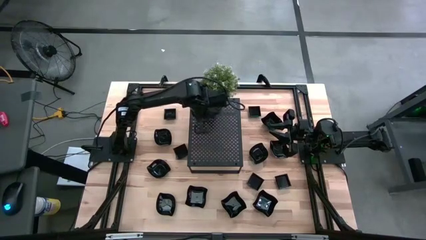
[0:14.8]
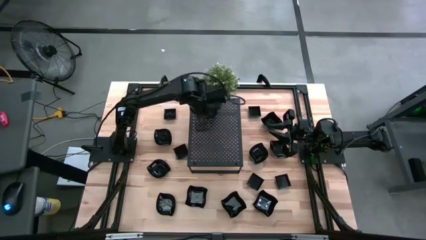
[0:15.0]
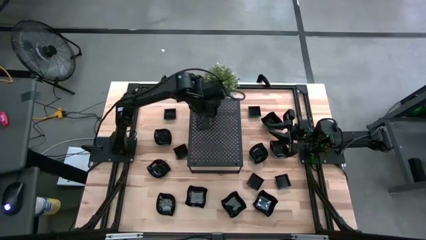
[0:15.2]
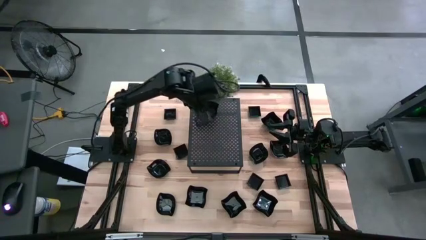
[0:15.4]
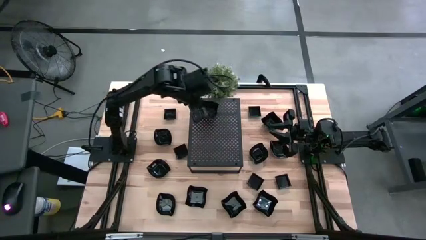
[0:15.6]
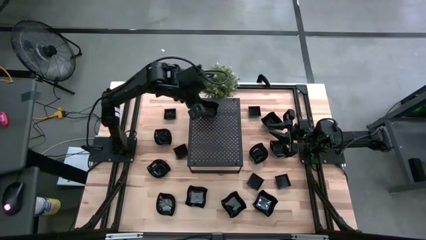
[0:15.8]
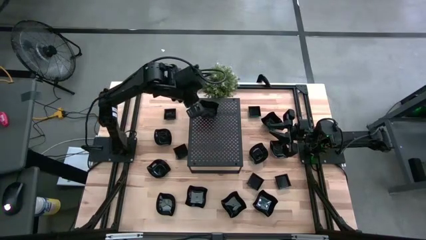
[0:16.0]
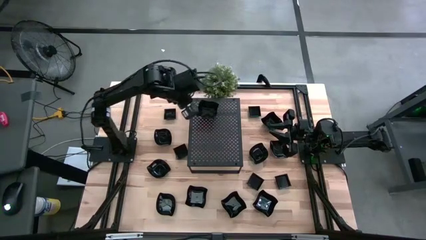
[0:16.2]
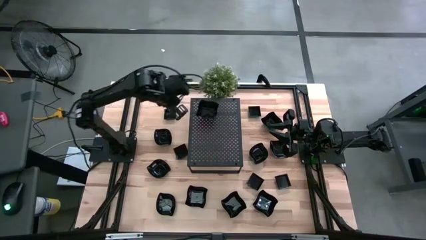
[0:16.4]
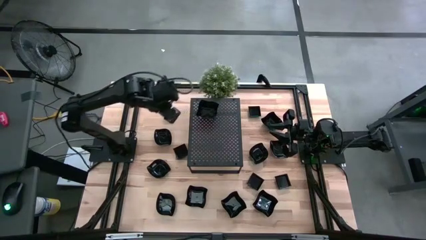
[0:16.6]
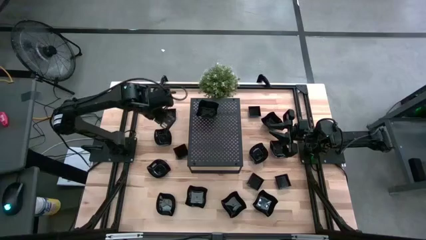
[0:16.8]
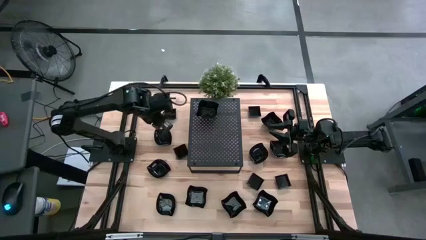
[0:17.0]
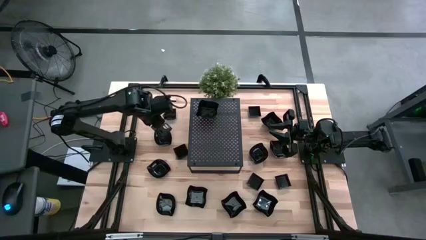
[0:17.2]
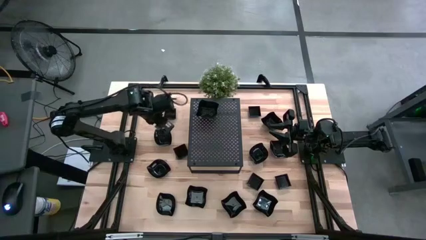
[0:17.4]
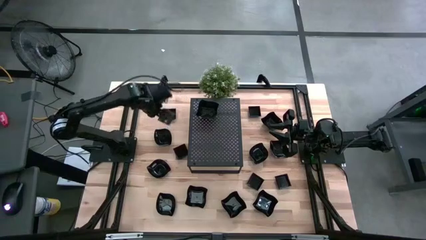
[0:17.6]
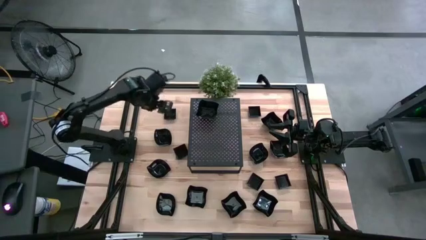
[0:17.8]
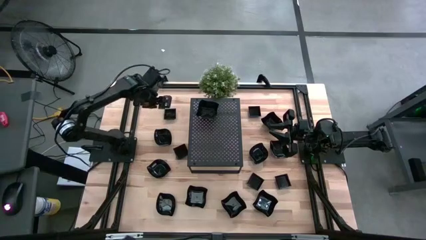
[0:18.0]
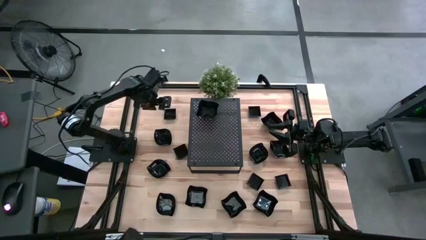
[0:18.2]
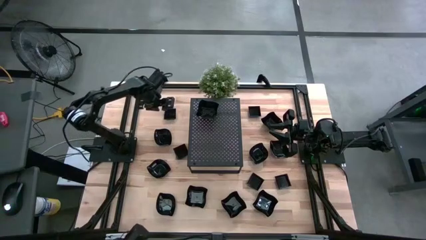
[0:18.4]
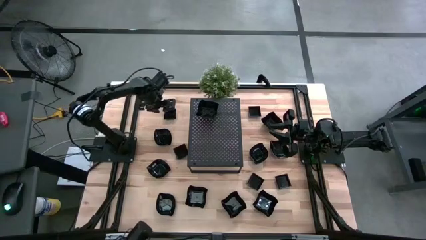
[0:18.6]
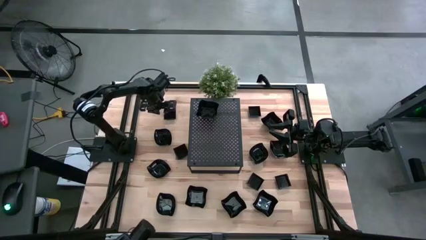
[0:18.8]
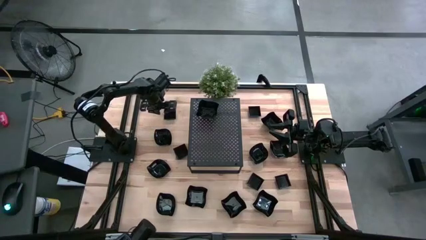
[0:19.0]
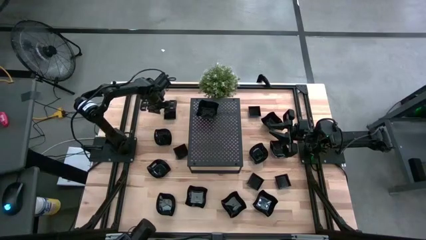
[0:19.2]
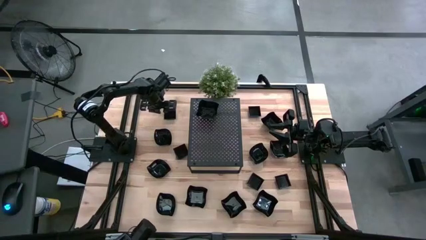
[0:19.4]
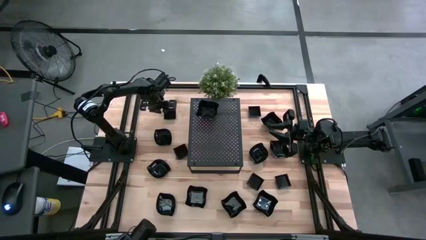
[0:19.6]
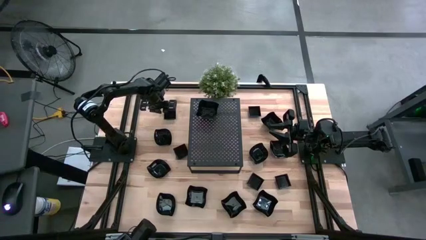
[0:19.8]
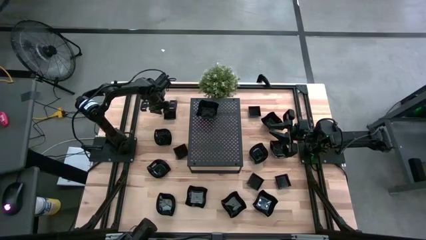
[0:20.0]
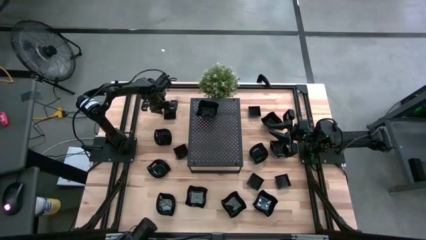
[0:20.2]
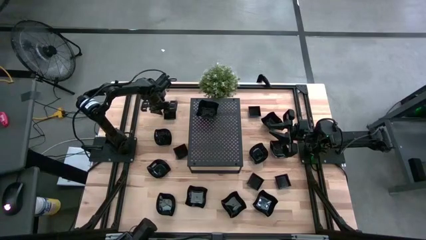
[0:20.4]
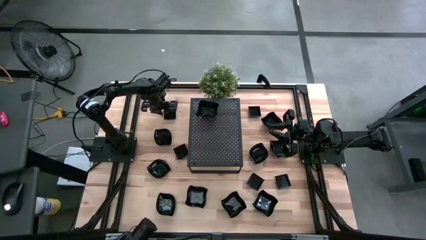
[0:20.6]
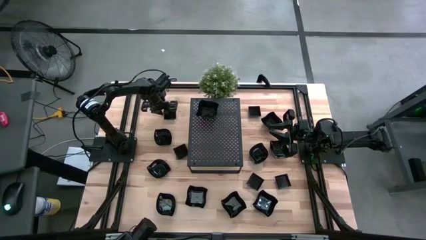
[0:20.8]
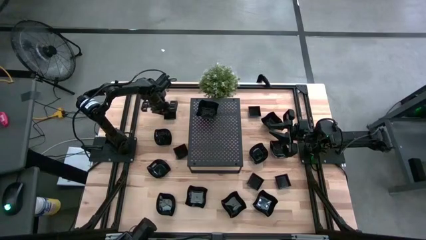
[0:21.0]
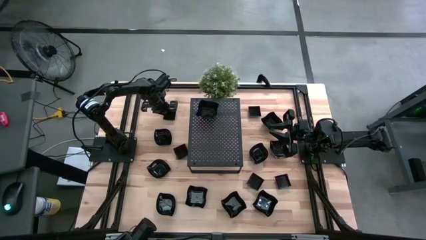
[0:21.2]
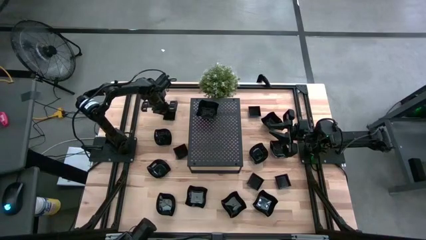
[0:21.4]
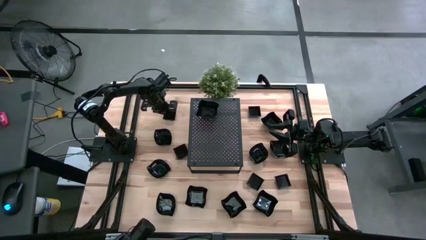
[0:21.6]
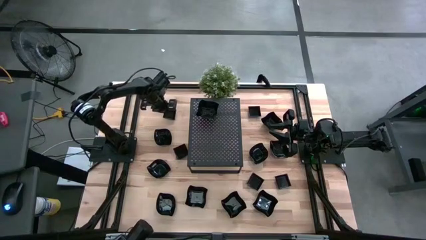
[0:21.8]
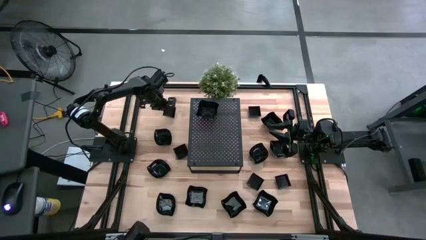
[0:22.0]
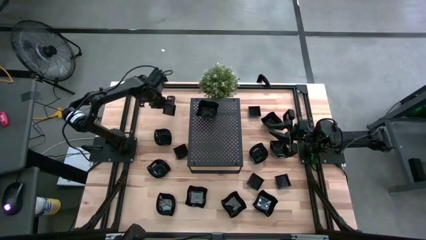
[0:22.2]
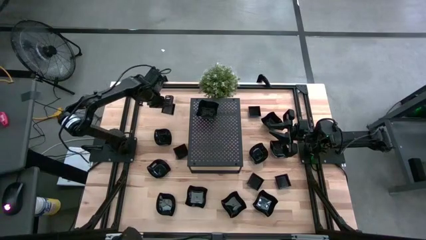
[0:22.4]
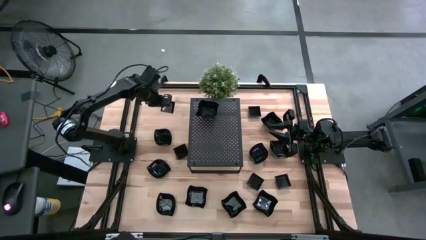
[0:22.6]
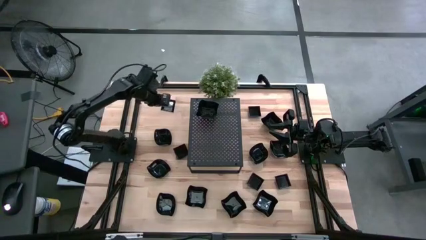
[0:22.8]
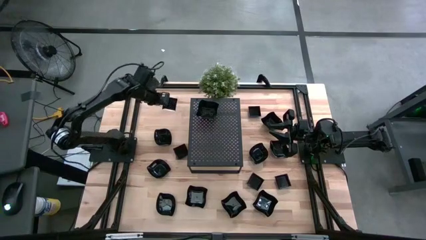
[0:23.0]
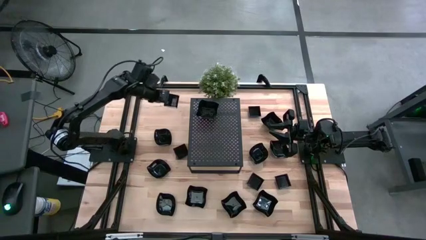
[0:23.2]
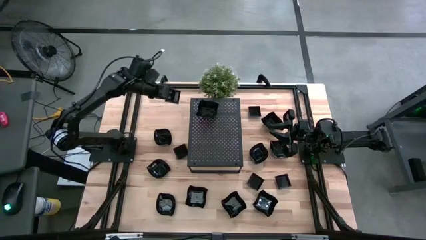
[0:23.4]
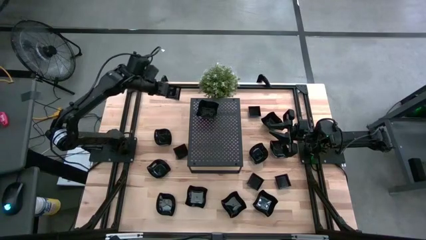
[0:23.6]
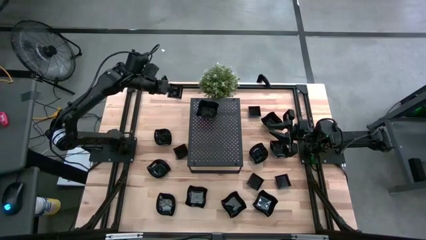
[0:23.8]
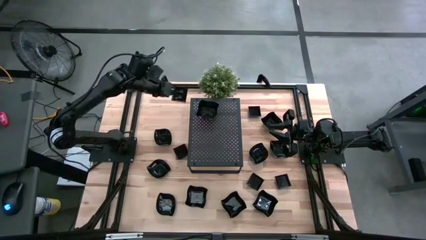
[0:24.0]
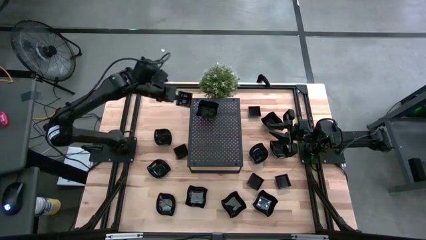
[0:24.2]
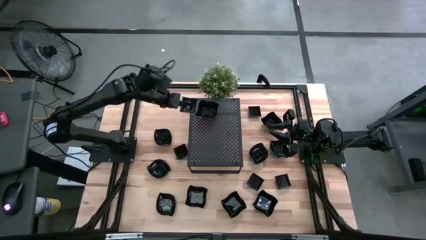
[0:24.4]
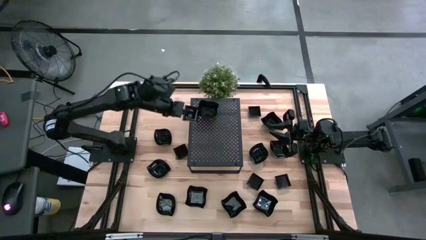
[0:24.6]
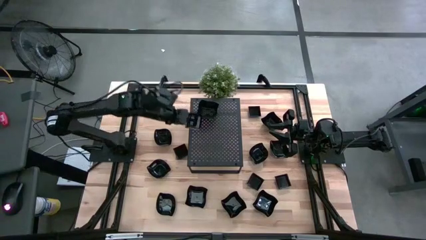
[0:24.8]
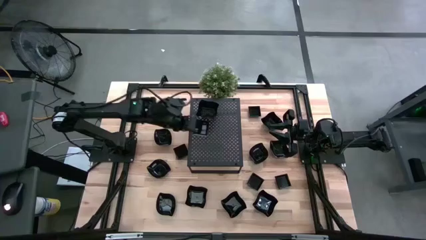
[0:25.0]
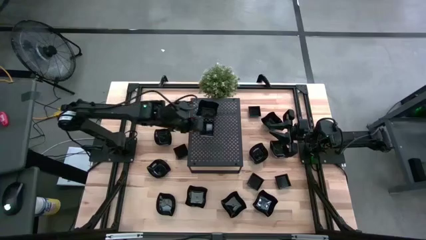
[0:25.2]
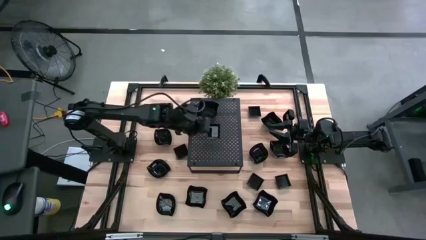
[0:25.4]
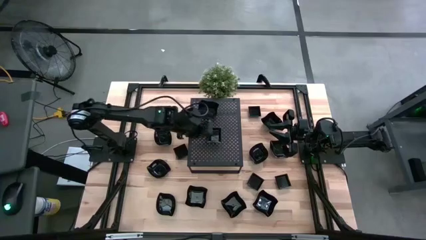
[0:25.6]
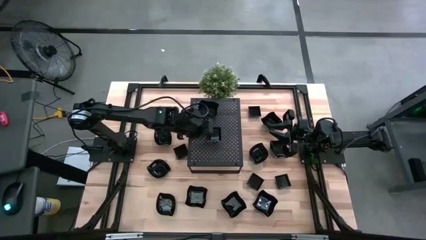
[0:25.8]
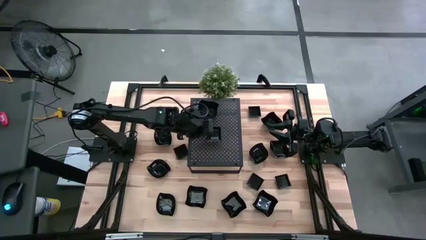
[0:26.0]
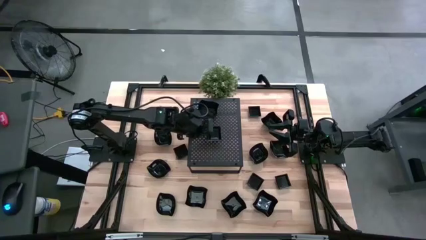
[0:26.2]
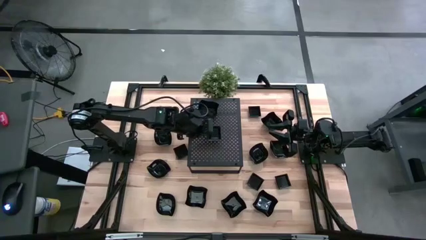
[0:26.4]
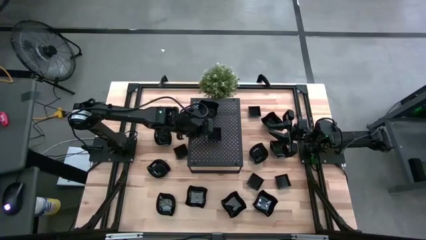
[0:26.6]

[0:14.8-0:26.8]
Task: Pick & Place Mini shaped plates
Put the square plate on the shelf
